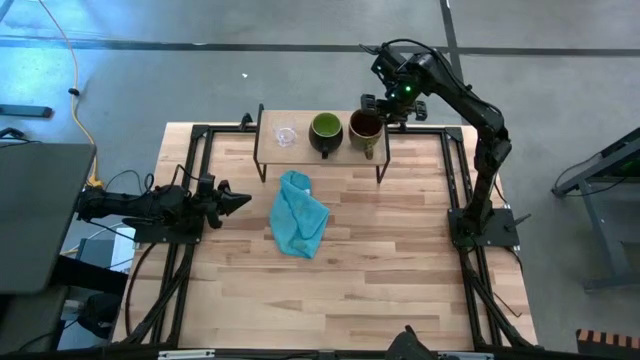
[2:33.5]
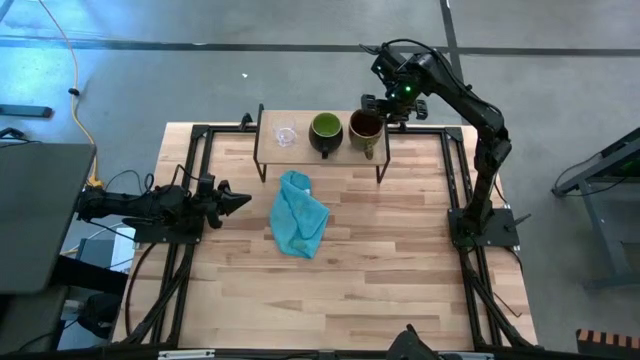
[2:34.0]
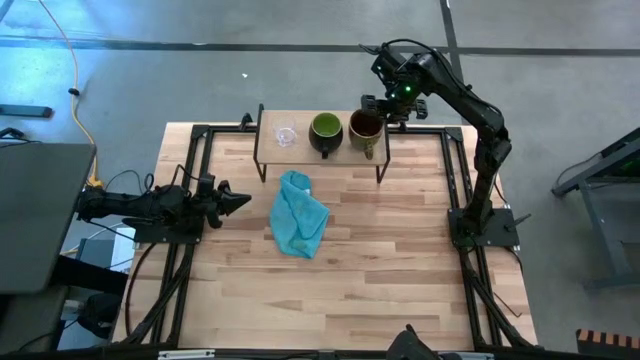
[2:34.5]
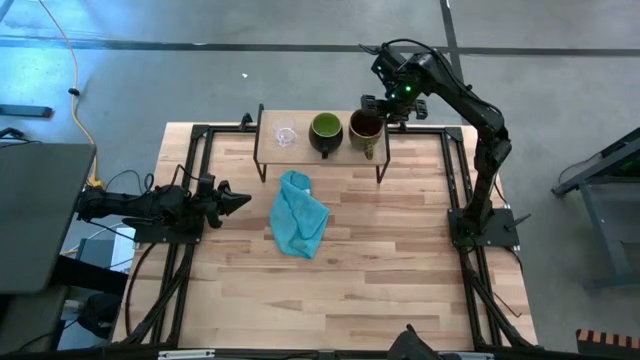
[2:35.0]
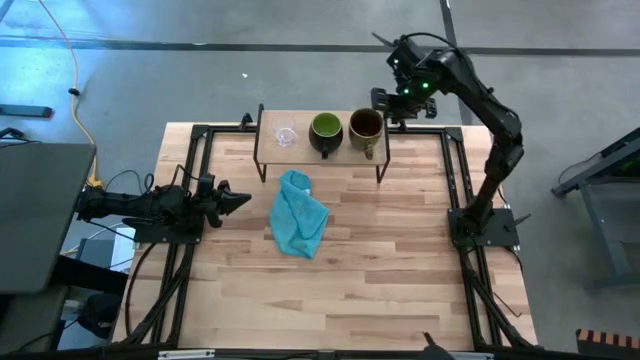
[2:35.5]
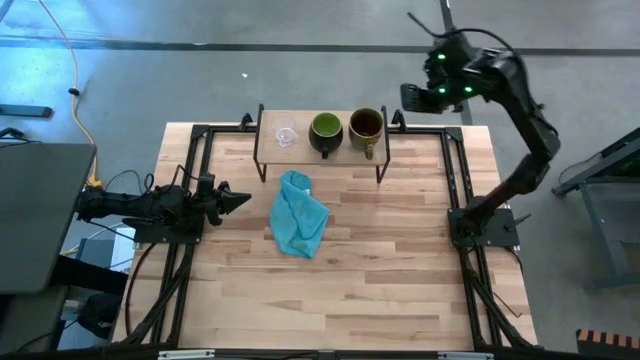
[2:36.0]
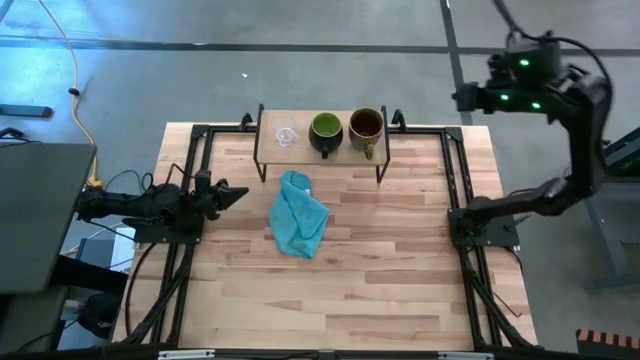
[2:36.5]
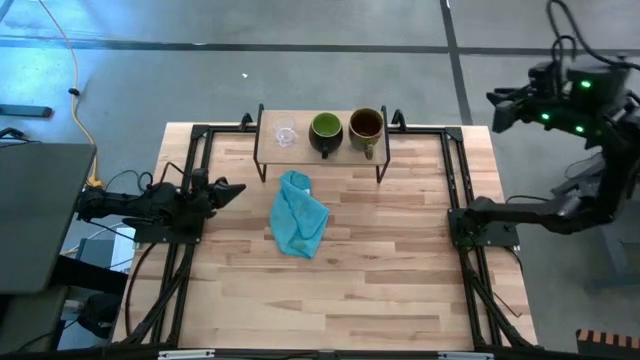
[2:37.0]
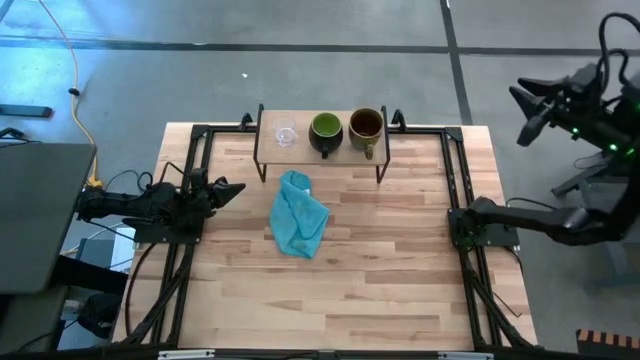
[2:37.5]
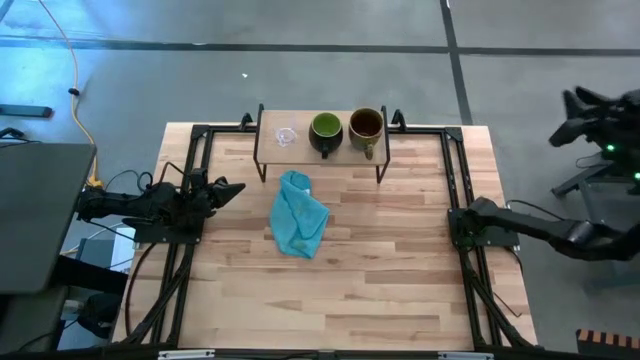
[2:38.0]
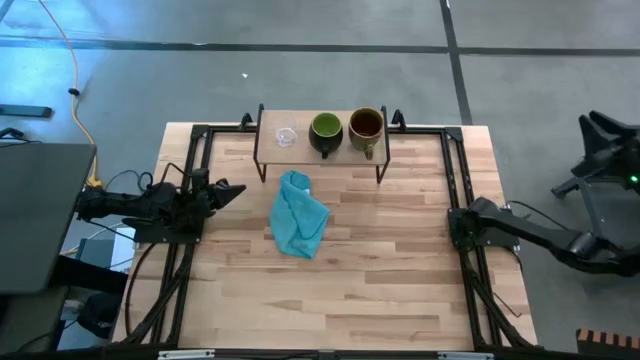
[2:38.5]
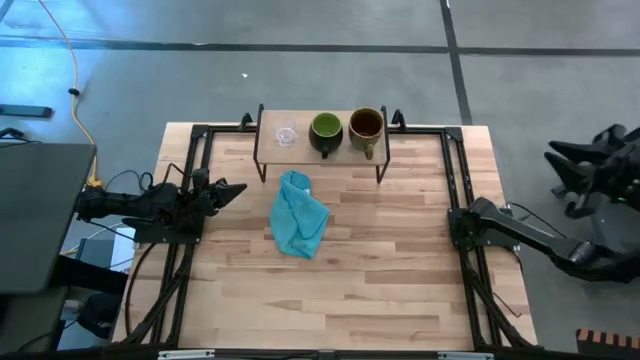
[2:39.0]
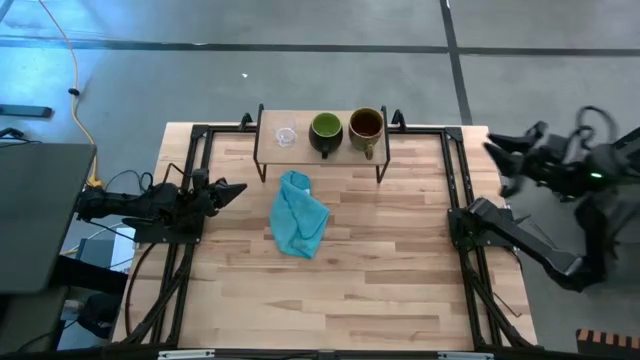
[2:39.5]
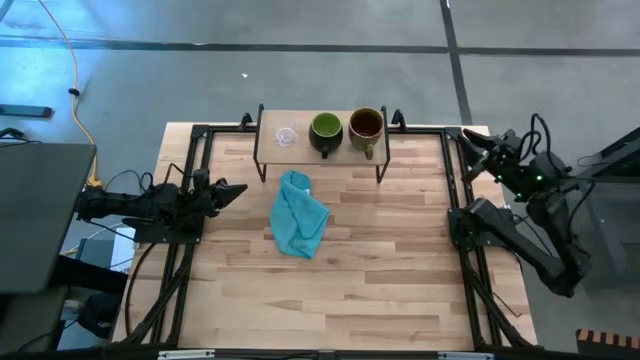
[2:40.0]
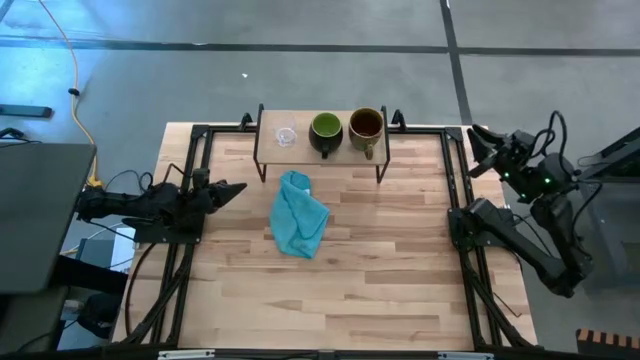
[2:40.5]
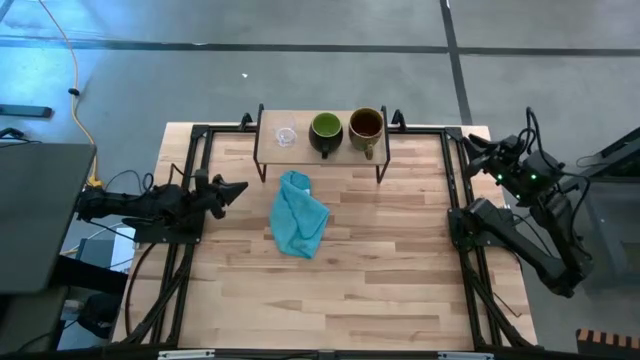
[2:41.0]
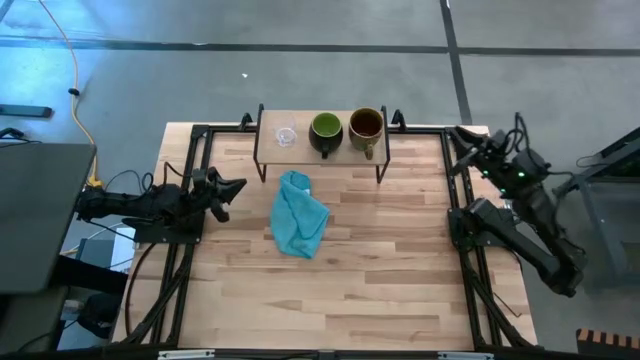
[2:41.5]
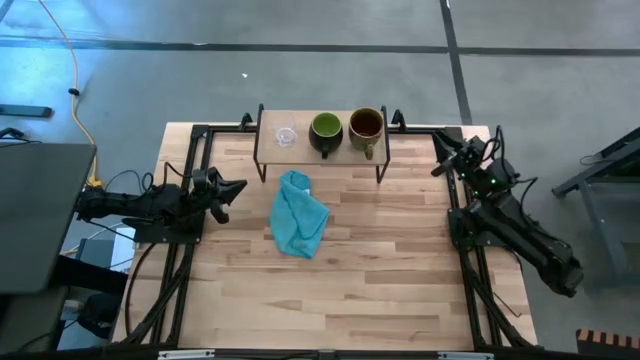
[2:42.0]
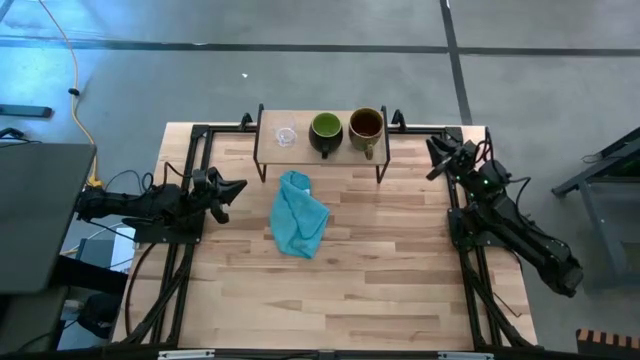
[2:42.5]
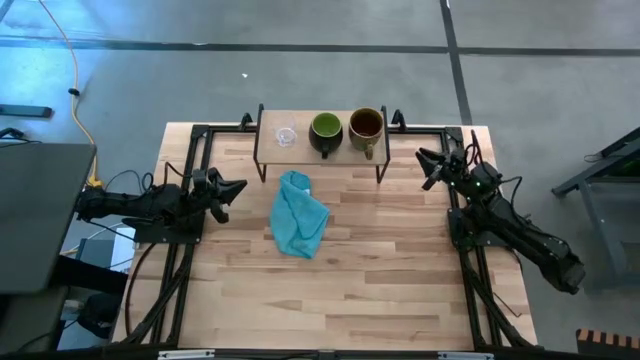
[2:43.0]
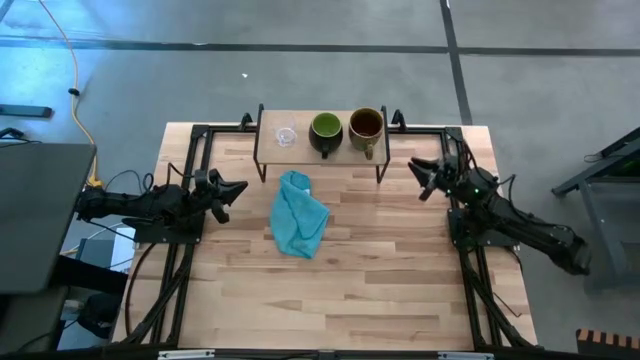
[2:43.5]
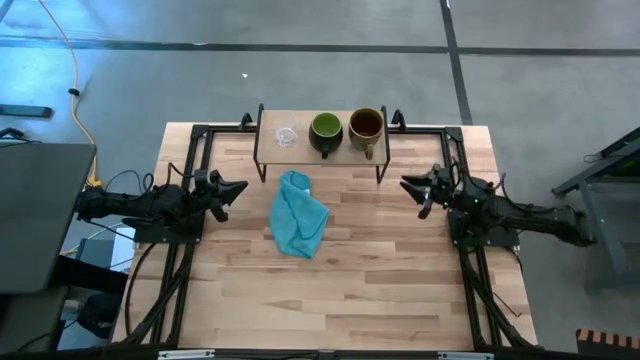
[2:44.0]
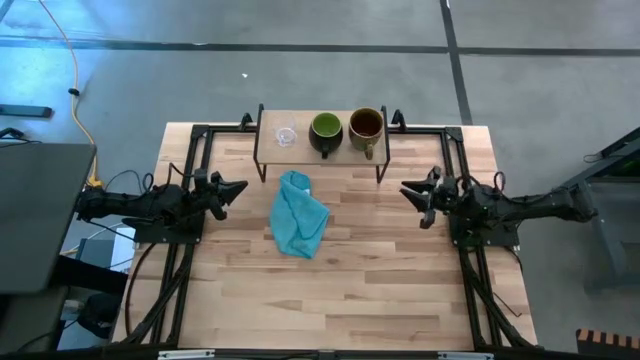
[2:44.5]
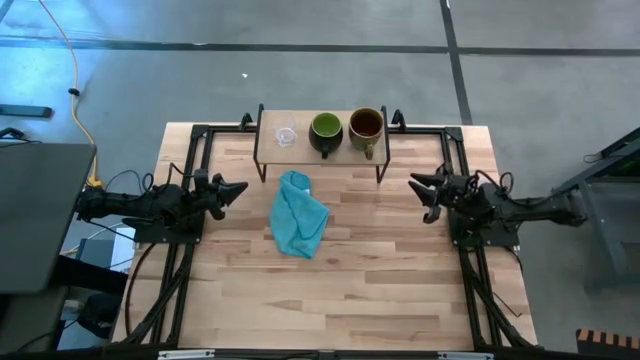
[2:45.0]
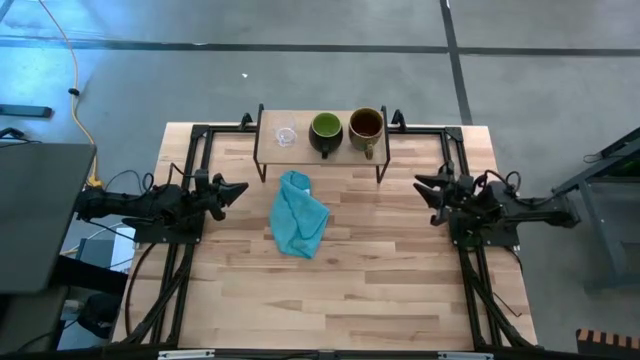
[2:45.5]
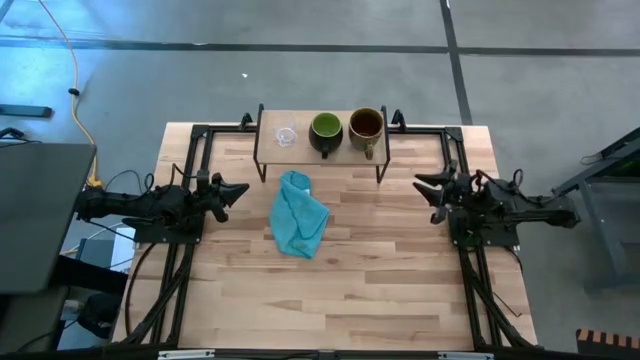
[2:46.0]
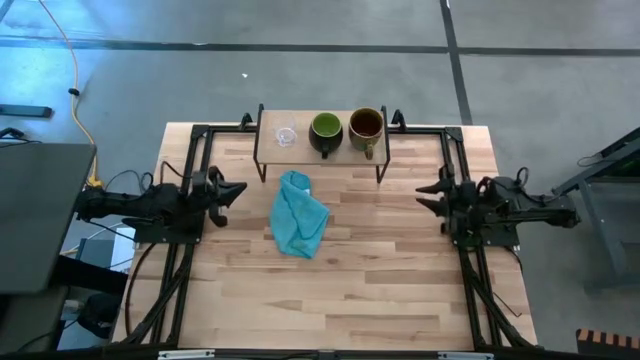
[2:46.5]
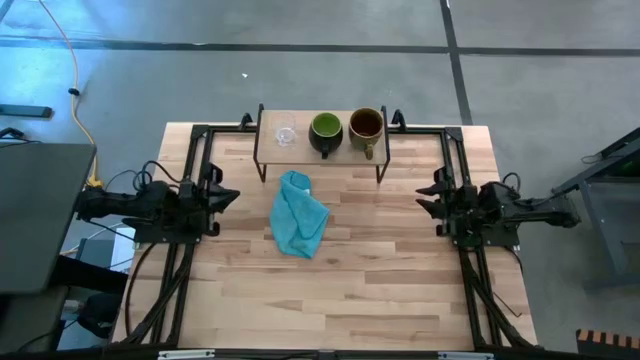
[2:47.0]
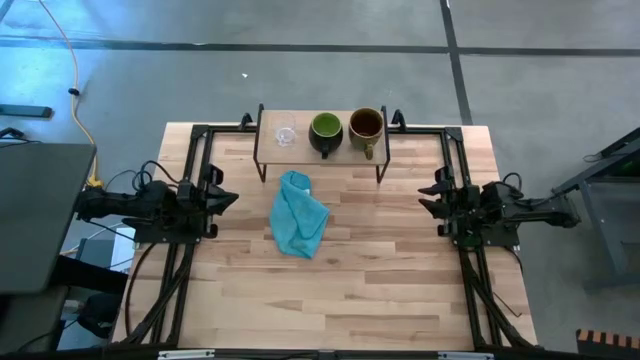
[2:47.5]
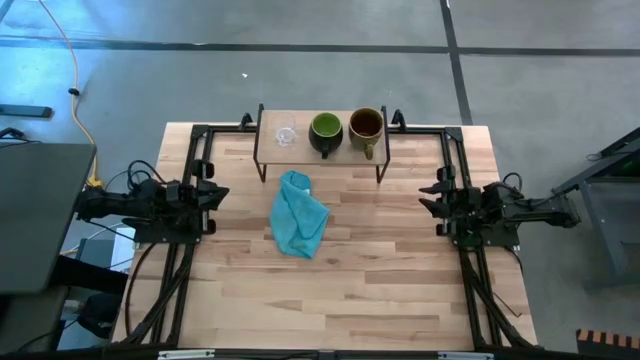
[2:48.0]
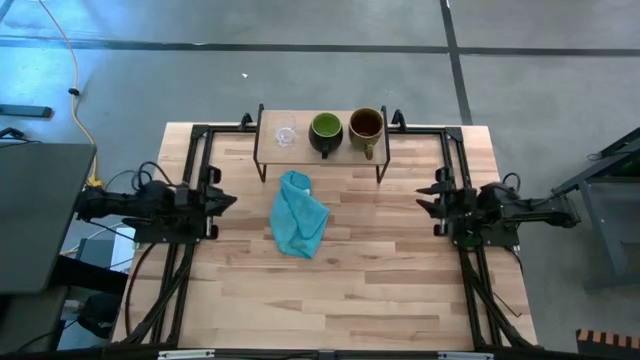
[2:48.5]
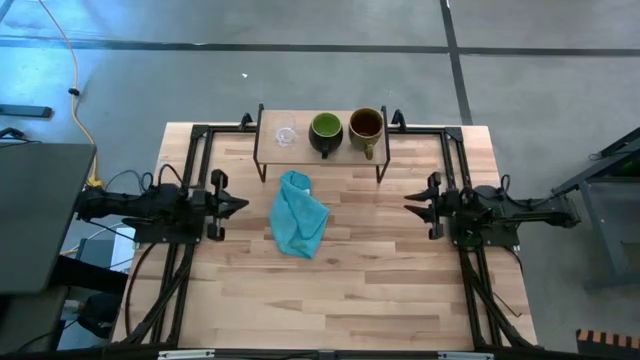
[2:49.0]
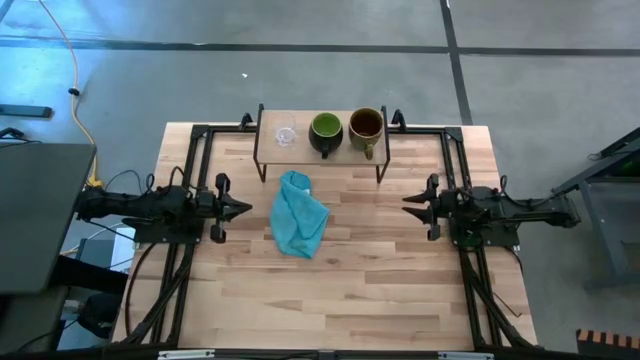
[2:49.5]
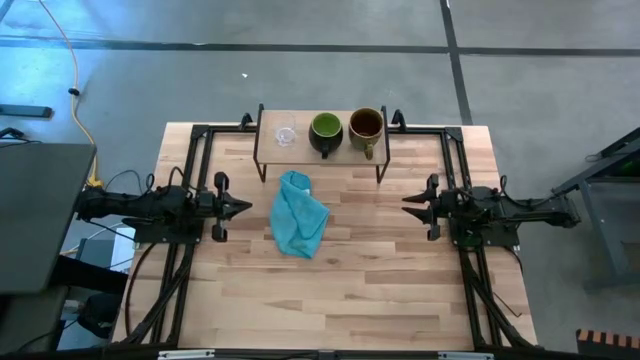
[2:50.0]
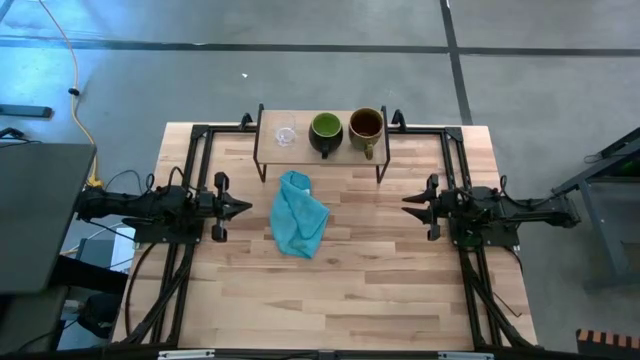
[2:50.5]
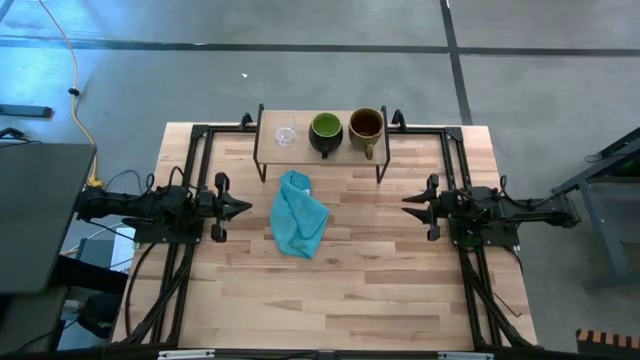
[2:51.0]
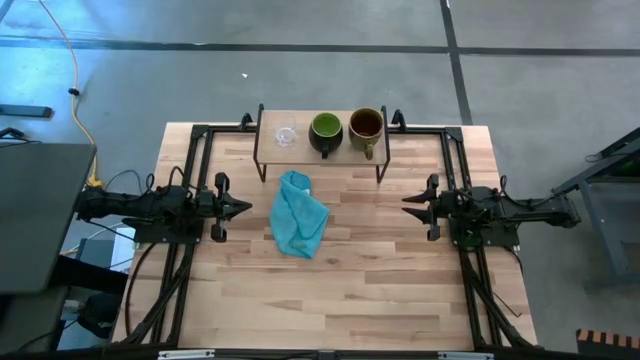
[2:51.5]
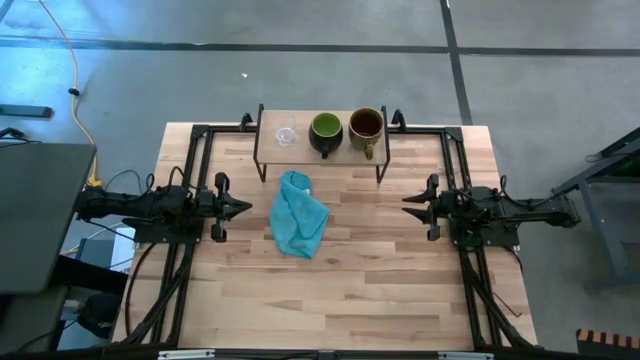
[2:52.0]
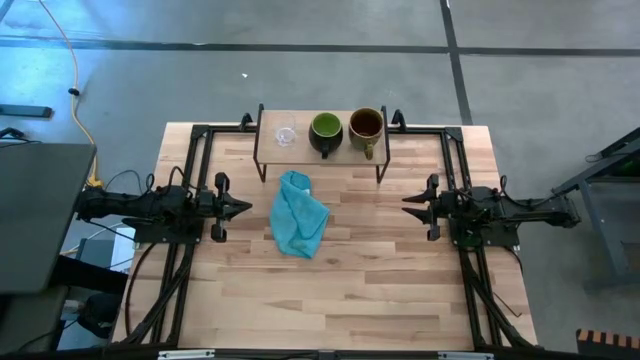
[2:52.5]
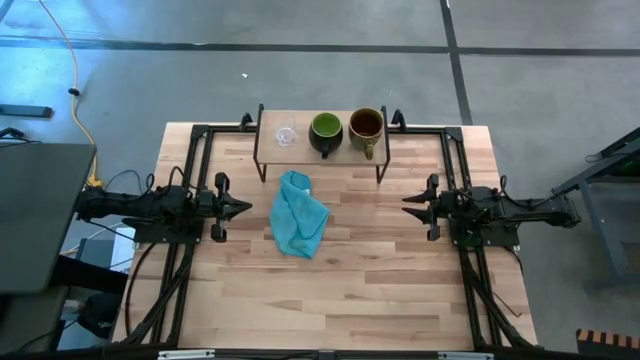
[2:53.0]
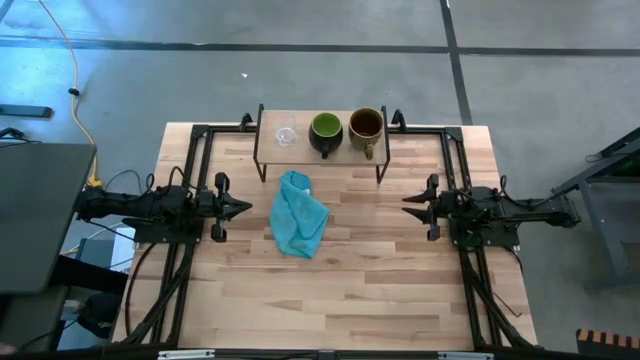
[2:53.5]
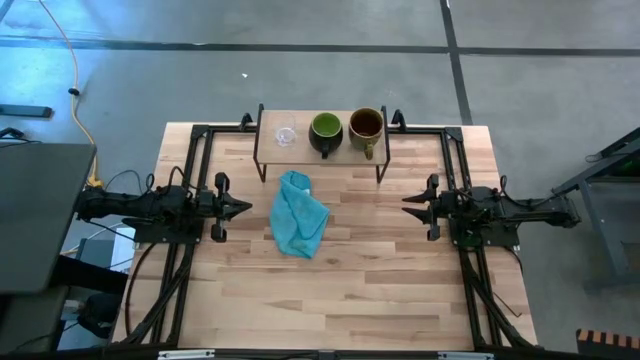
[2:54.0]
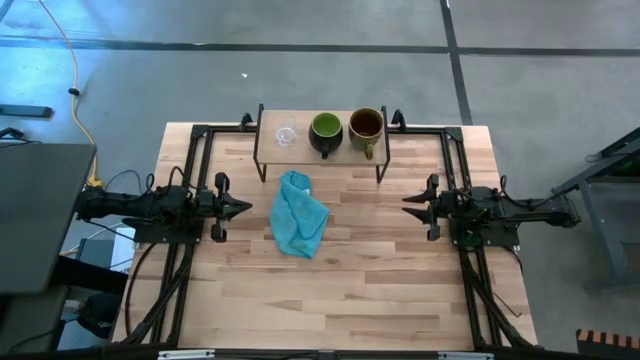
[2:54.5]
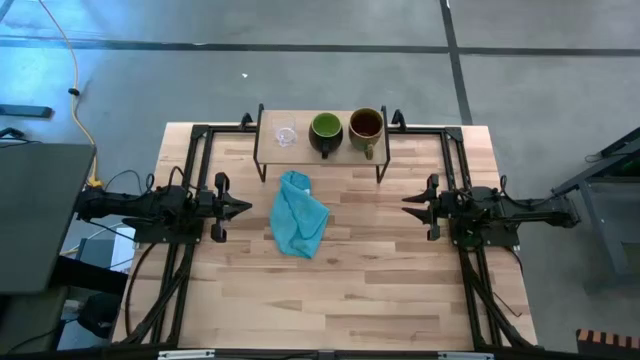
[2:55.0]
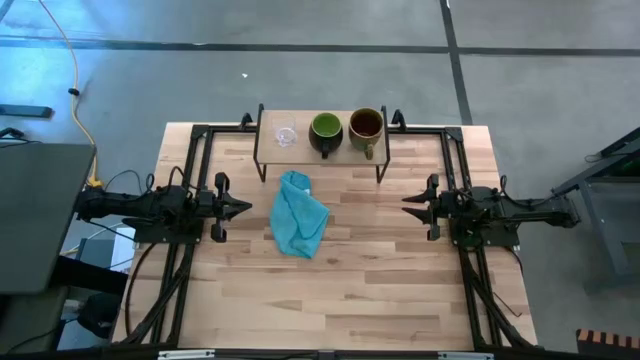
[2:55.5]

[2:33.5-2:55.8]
Task: Stack small to large cups/mugs on shelf
Return to Home Position
